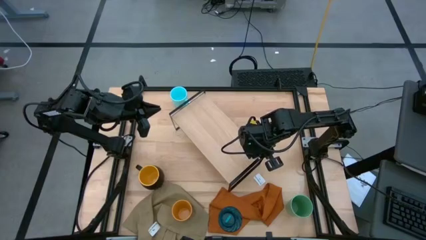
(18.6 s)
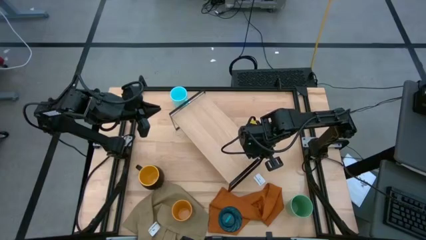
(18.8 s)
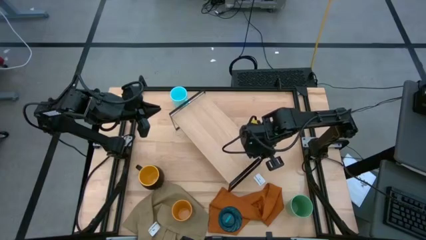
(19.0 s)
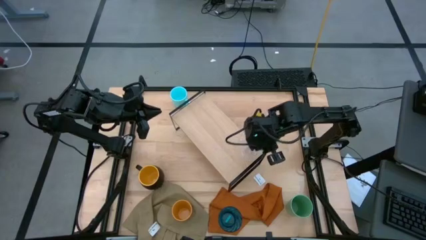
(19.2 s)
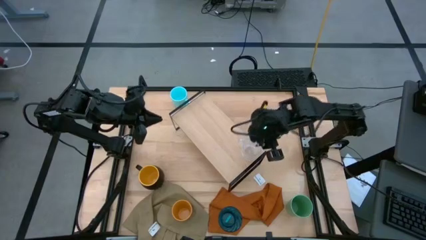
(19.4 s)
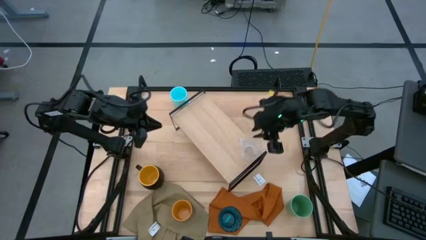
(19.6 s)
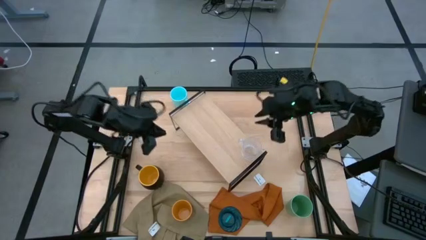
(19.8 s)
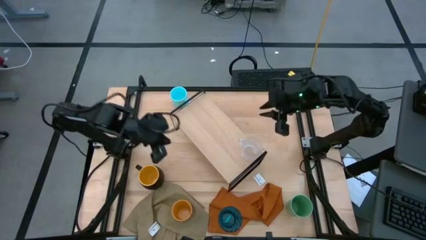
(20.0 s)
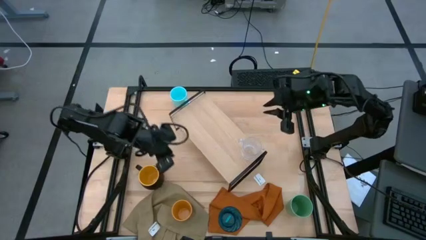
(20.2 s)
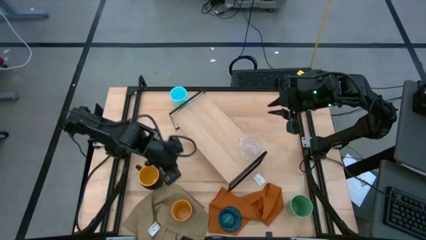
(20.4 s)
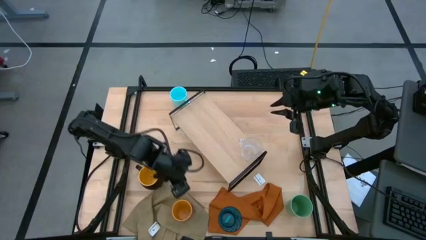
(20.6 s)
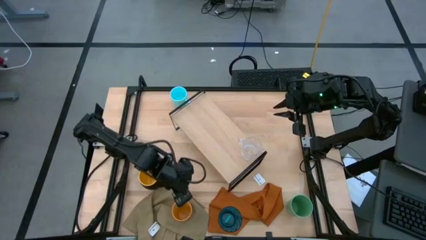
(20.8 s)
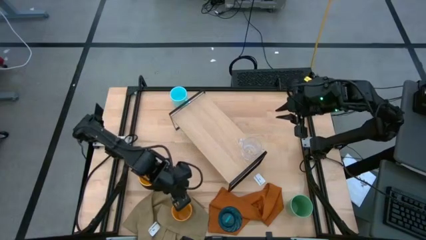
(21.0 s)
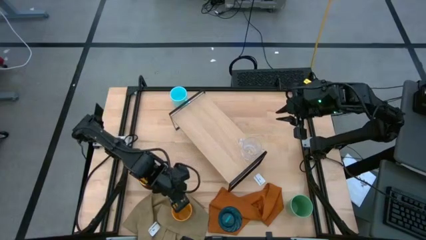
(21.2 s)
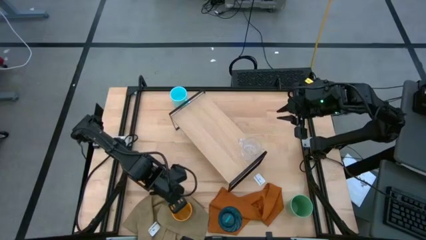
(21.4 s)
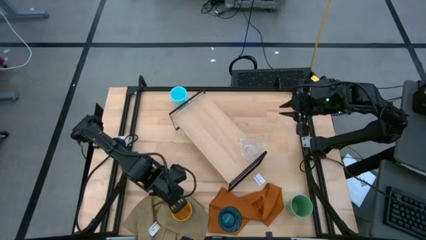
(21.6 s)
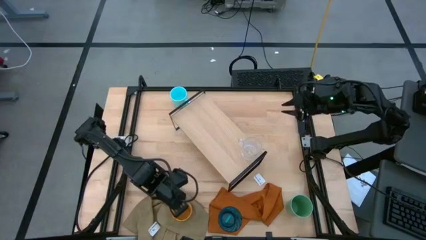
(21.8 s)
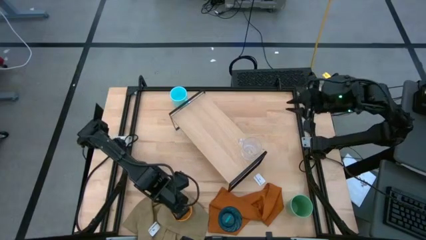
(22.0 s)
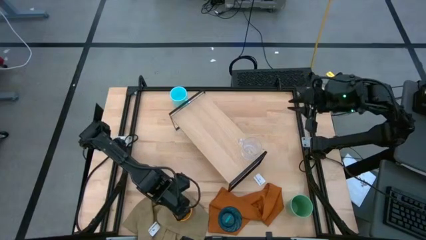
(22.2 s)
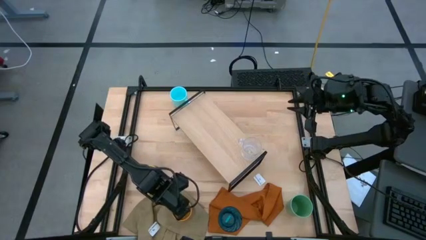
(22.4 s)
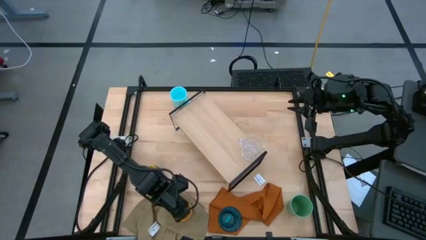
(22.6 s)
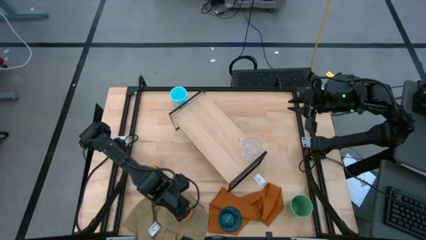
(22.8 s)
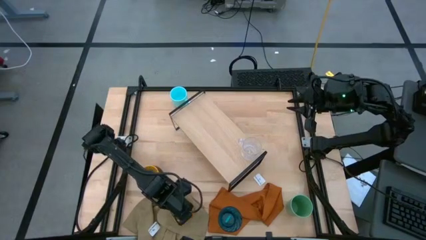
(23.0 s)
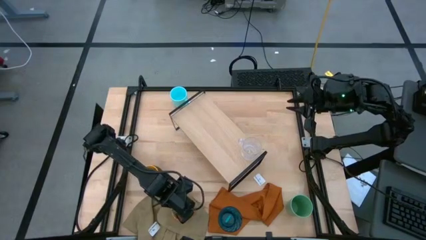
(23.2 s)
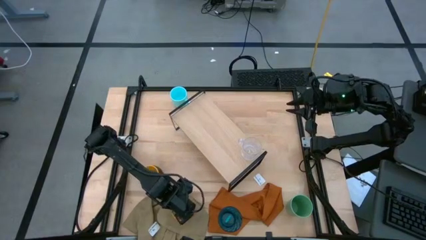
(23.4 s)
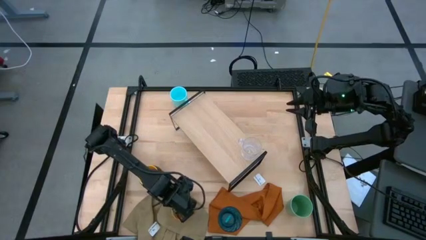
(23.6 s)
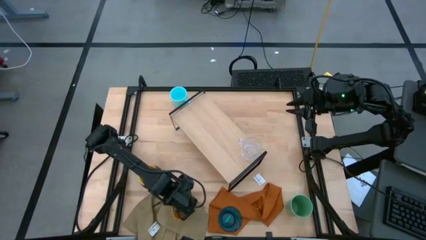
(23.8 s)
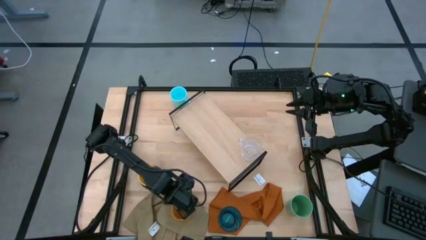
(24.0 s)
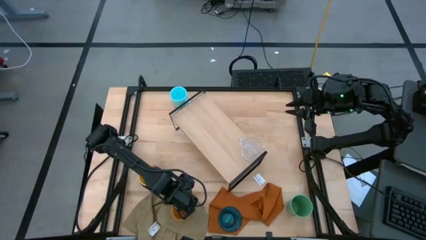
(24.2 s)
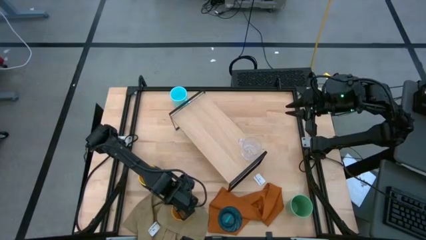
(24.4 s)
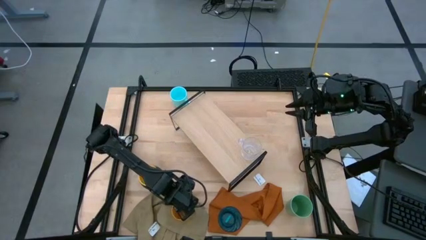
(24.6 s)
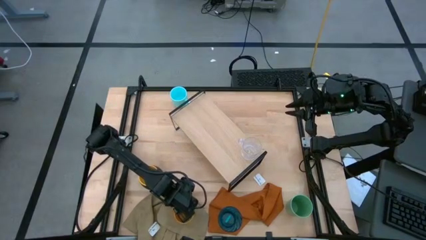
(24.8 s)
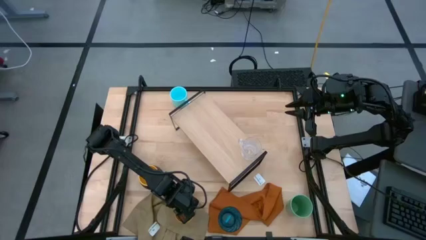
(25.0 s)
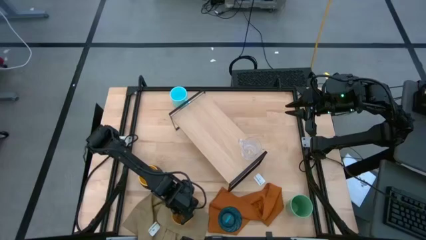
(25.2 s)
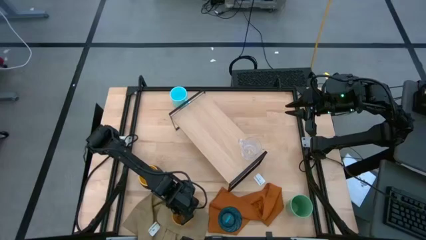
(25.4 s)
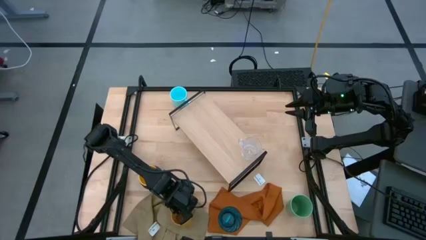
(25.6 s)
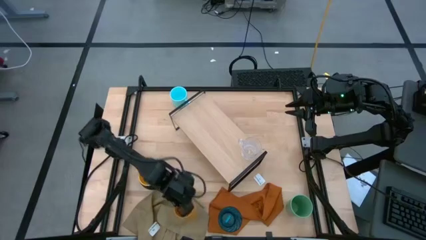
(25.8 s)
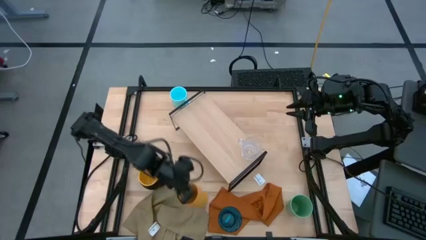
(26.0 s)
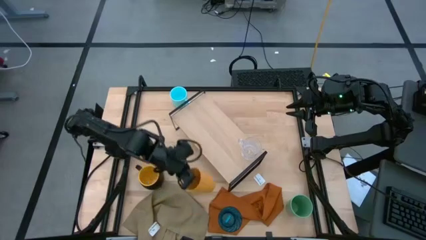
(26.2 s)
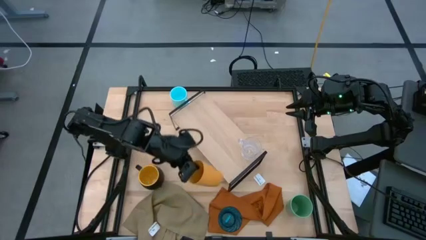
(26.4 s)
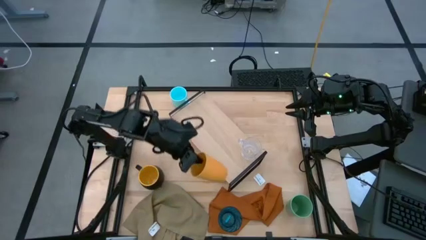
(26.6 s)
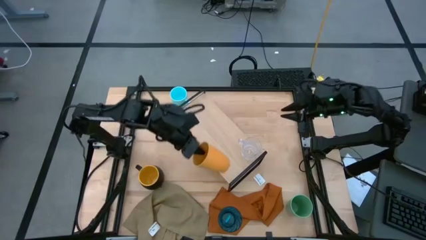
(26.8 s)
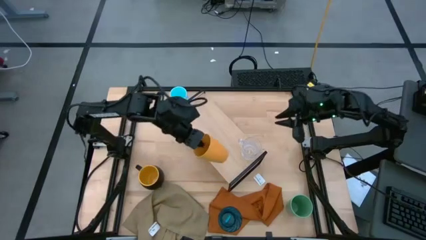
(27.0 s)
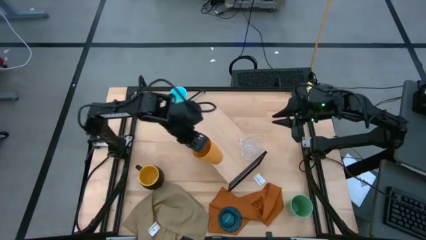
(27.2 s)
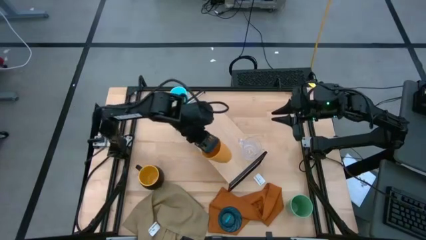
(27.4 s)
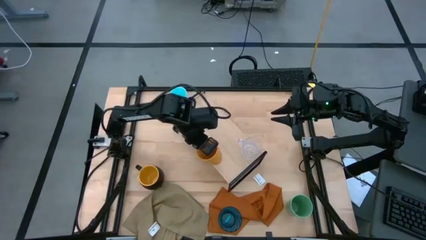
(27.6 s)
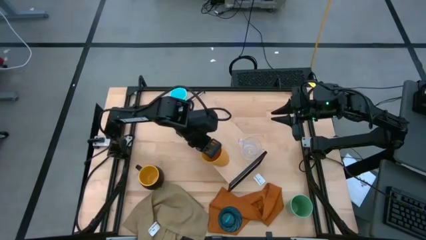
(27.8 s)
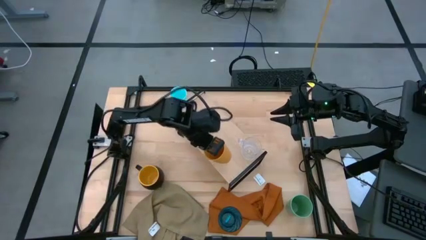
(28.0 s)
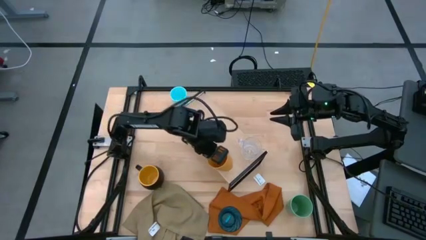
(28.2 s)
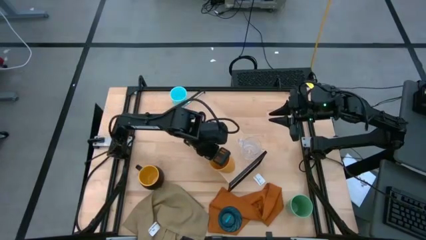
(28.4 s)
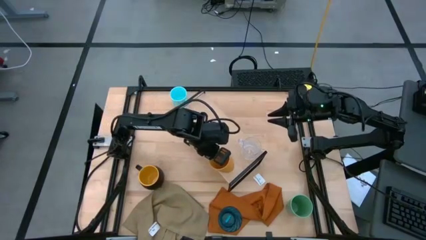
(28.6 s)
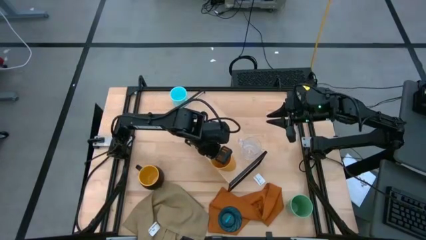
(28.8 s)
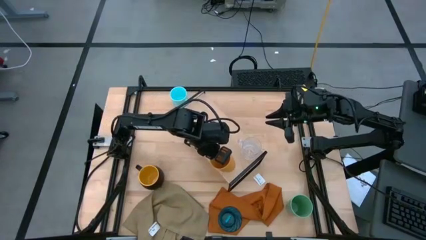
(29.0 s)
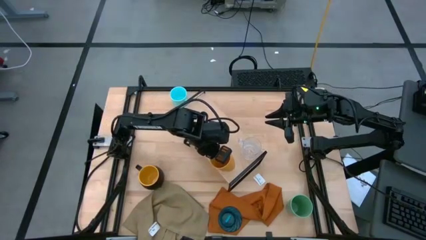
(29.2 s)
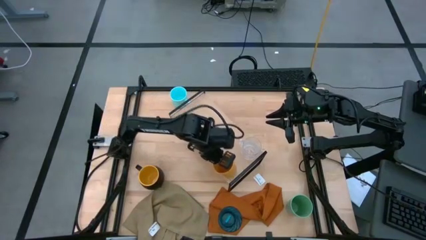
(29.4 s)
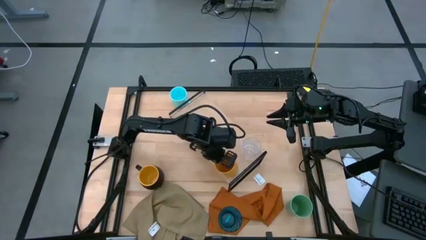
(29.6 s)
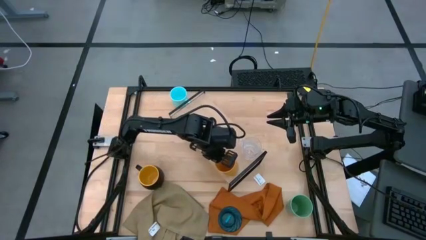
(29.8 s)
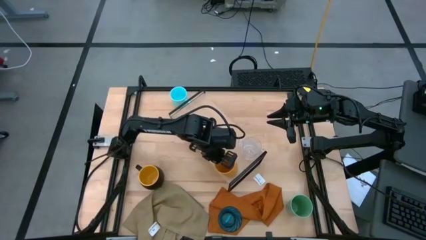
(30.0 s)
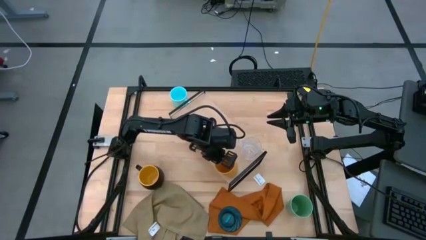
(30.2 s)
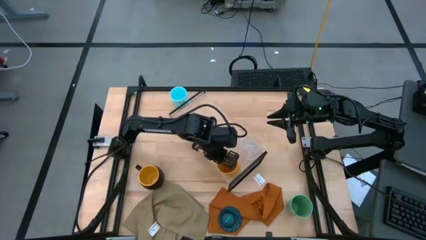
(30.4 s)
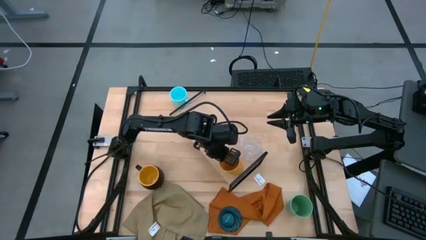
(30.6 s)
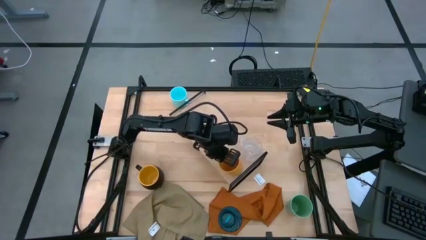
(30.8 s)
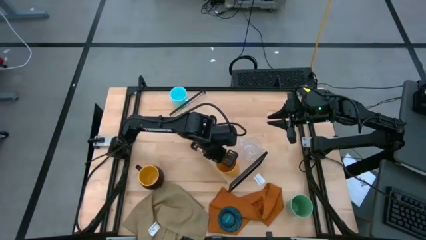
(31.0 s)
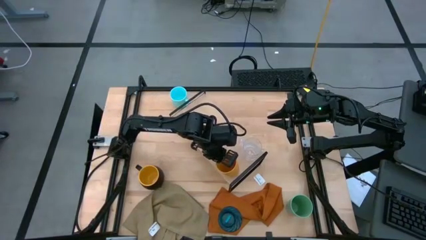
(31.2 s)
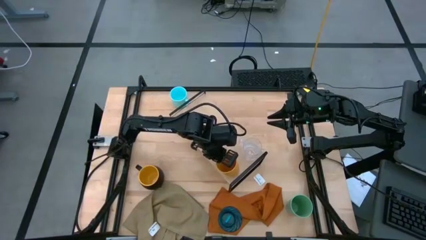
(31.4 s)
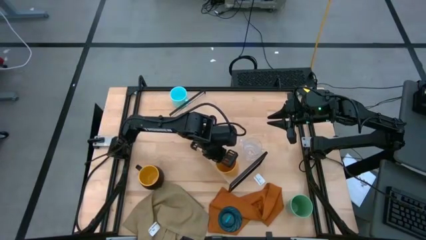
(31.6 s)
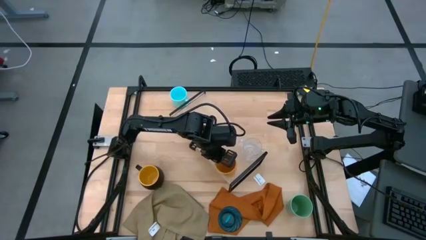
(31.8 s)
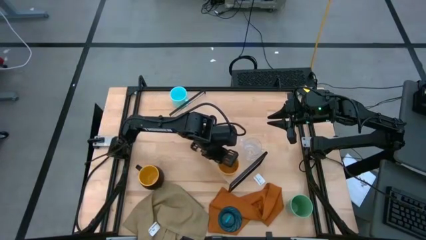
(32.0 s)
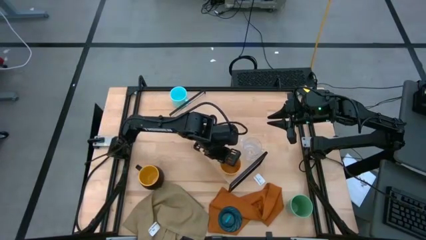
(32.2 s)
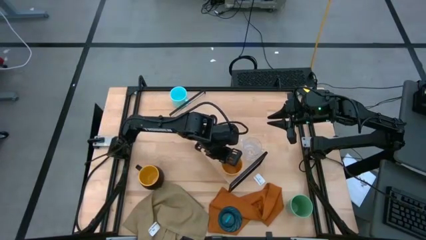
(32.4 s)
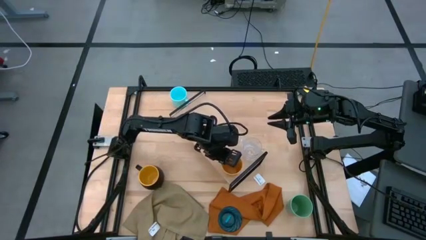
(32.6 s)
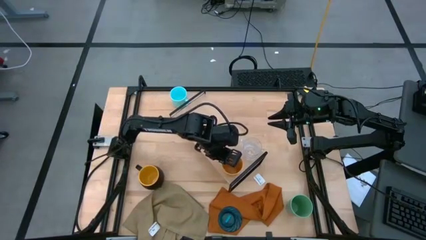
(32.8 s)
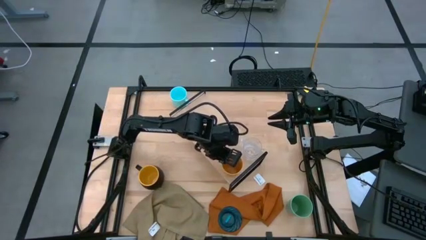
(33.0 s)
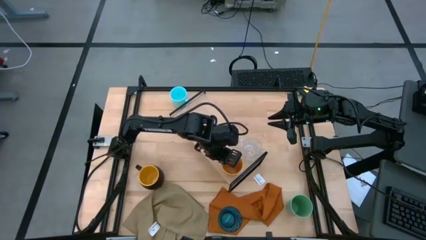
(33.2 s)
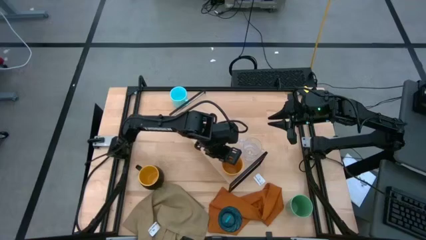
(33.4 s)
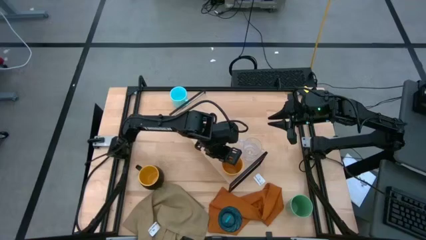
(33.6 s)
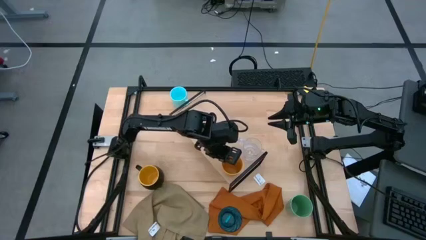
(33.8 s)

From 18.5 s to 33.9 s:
Task: Stack small to large cups/mugs on shelf
Put the yellow cup on the shelf

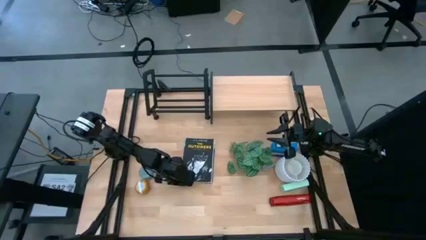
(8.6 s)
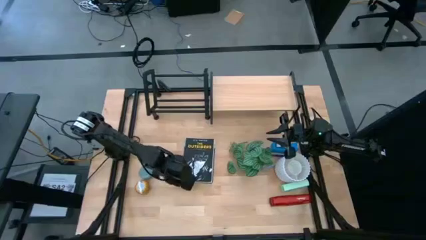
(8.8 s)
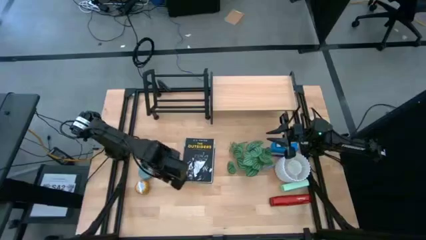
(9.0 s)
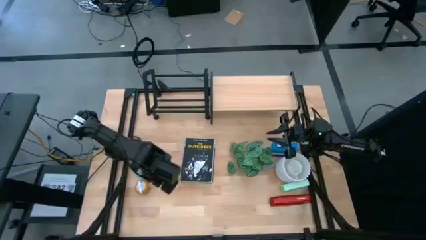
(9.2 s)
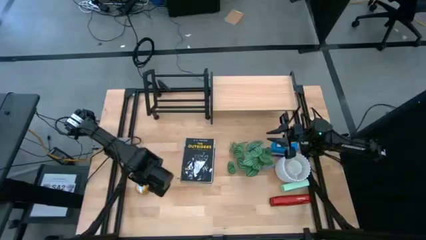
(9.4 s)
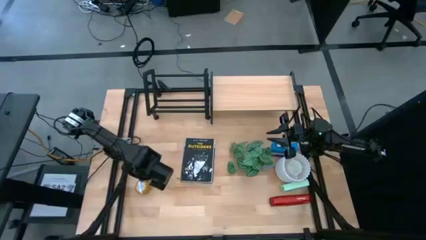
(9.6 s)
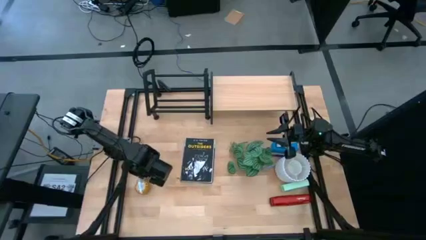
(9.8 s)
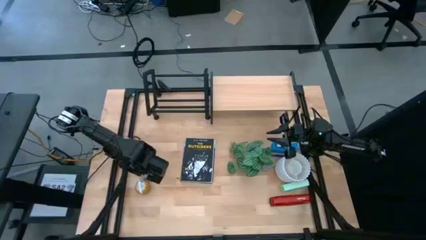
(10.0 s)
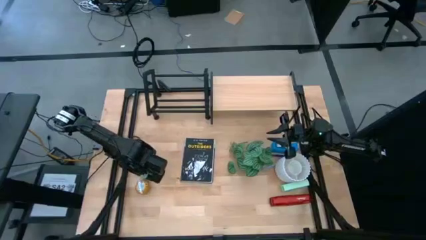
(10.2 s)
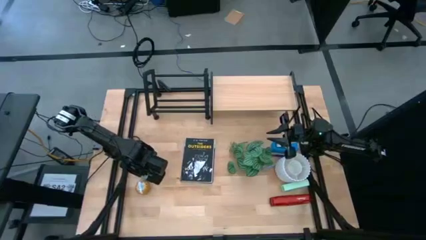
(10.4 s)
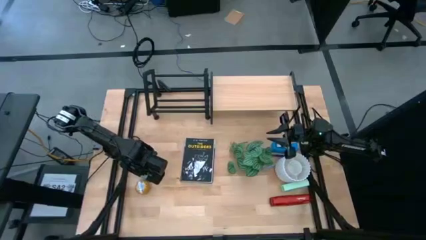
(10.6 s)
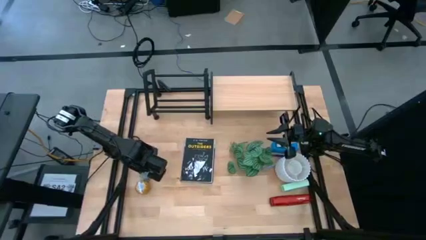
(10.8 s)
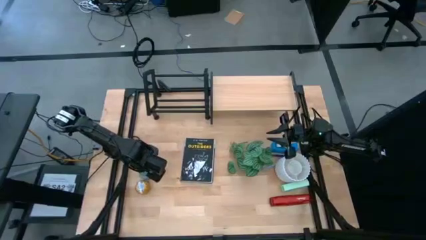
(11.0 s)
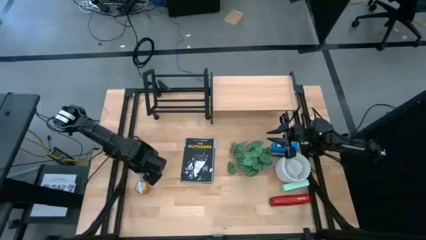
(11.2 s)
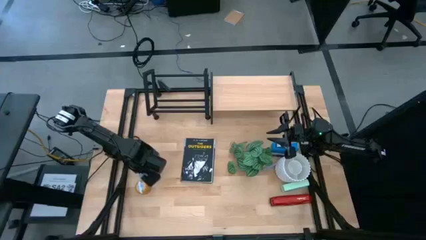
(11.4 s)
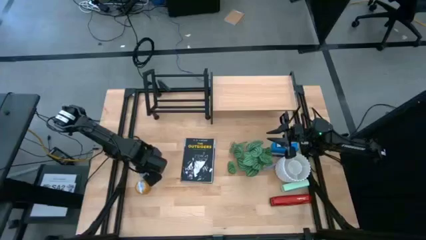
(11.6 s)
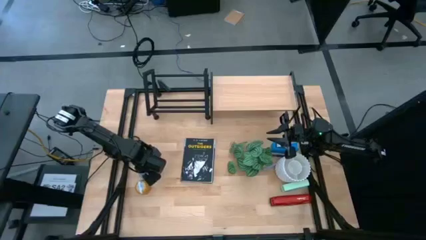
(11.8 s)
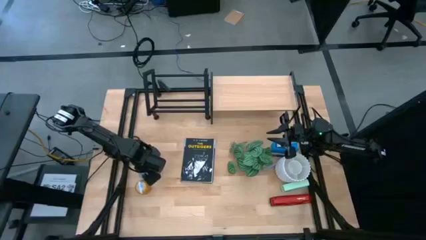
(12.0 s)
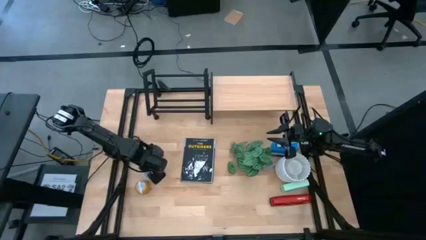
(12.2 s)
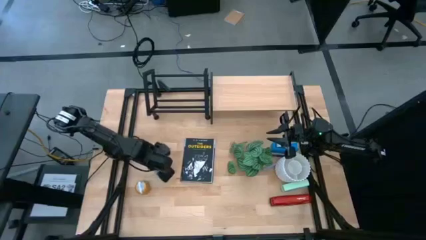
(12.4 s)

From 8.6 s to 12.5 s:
Task: Stock shelves
Put the blue scented candle on the shelf
